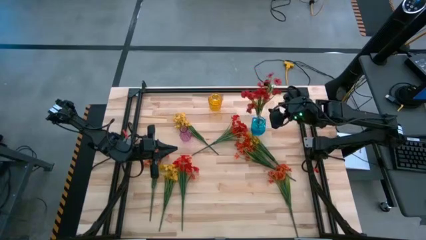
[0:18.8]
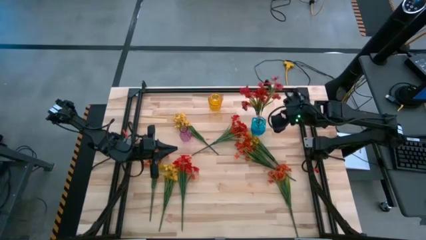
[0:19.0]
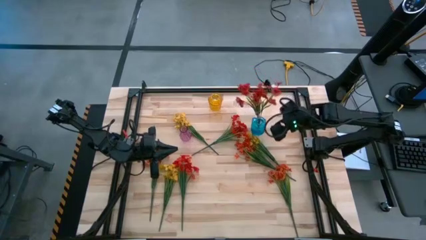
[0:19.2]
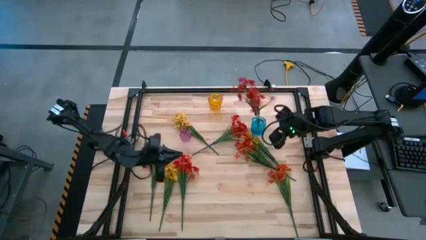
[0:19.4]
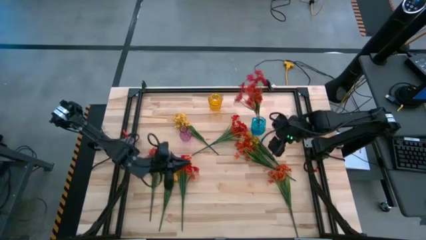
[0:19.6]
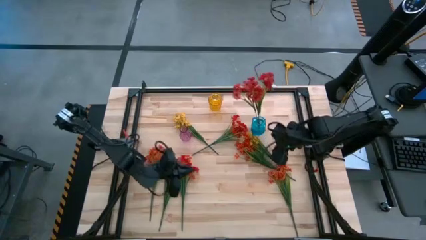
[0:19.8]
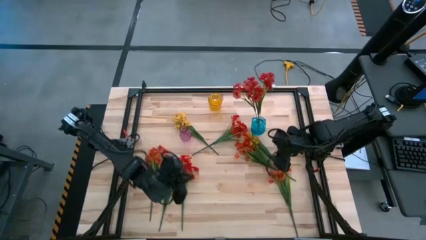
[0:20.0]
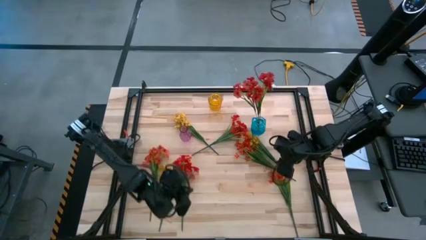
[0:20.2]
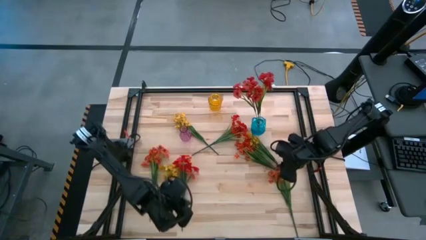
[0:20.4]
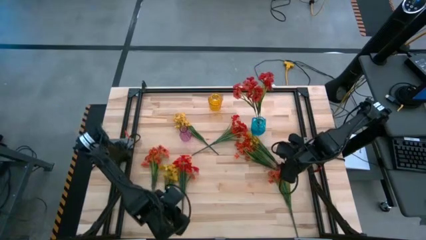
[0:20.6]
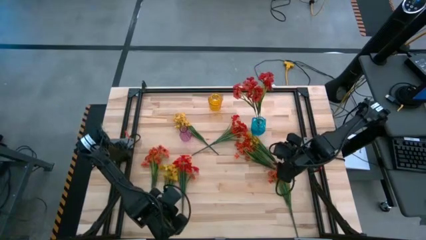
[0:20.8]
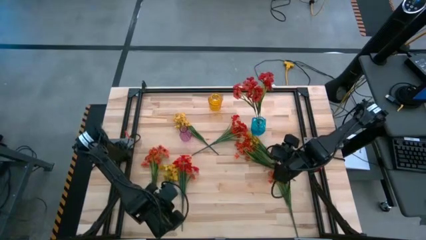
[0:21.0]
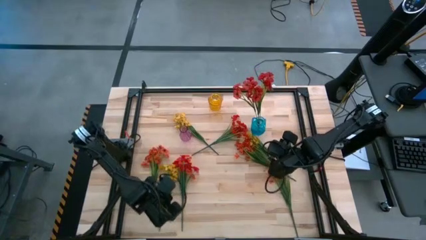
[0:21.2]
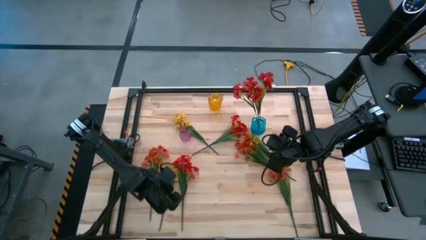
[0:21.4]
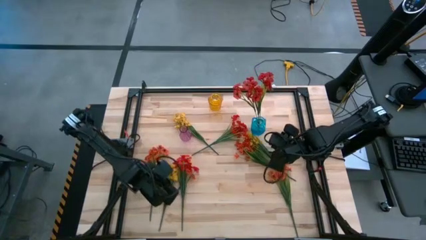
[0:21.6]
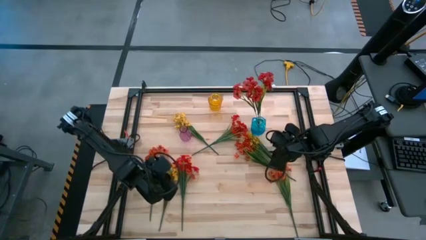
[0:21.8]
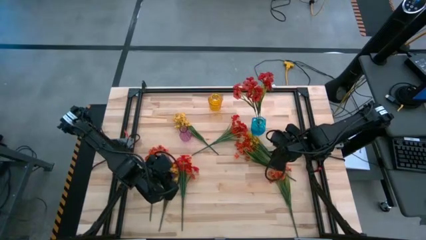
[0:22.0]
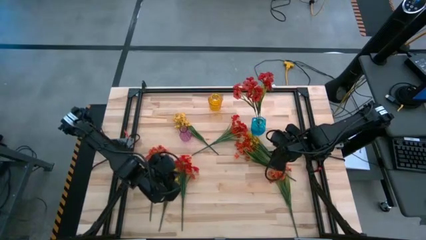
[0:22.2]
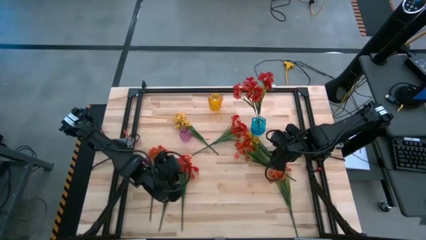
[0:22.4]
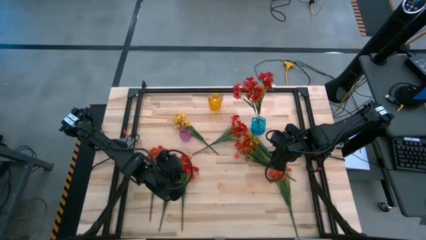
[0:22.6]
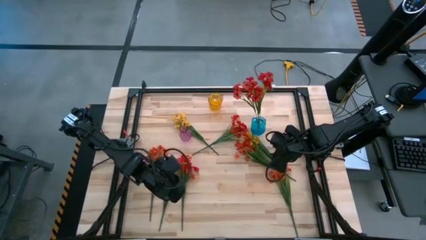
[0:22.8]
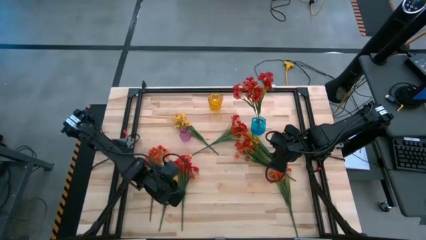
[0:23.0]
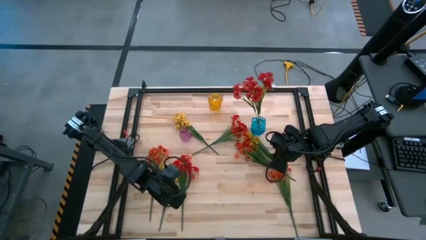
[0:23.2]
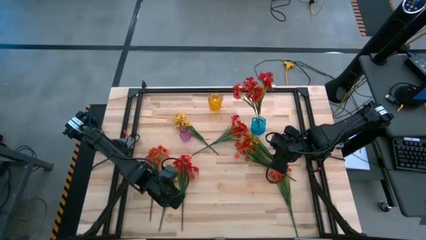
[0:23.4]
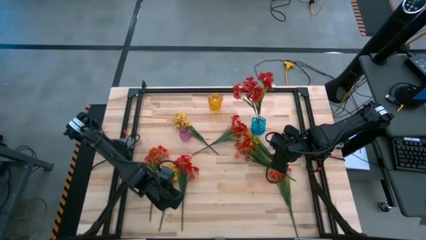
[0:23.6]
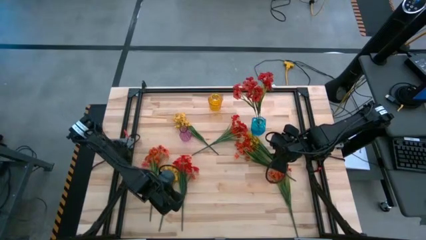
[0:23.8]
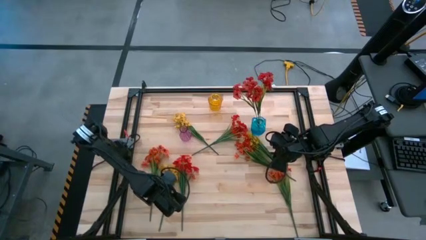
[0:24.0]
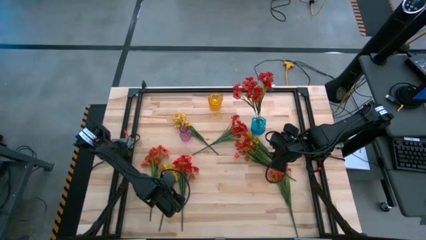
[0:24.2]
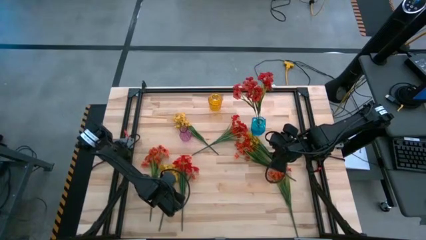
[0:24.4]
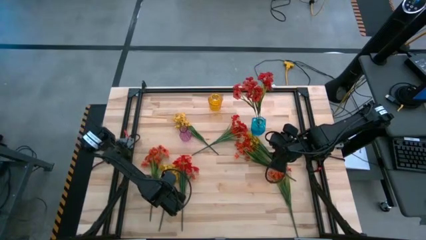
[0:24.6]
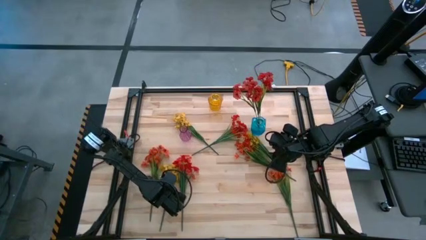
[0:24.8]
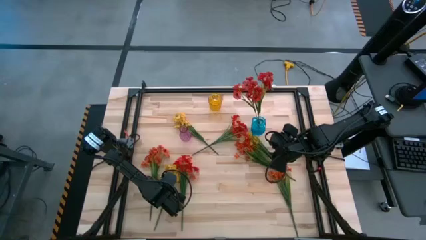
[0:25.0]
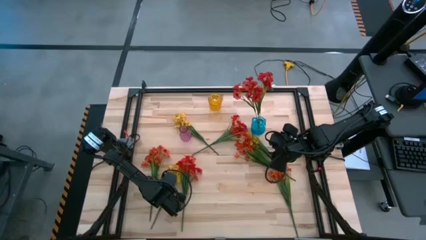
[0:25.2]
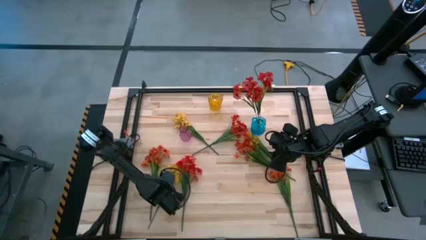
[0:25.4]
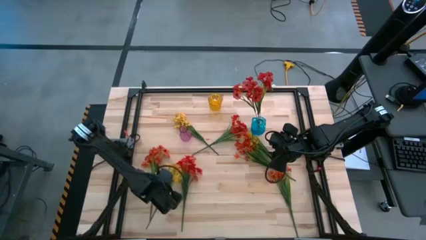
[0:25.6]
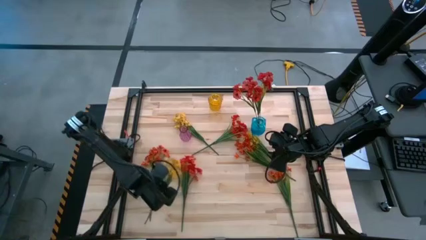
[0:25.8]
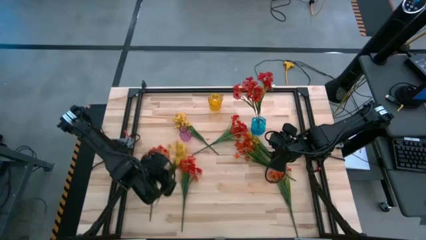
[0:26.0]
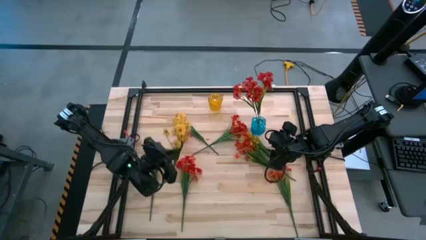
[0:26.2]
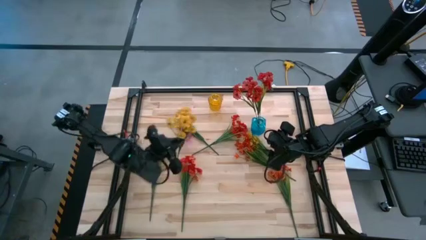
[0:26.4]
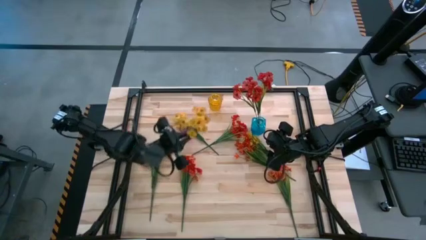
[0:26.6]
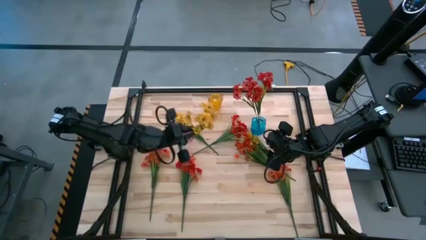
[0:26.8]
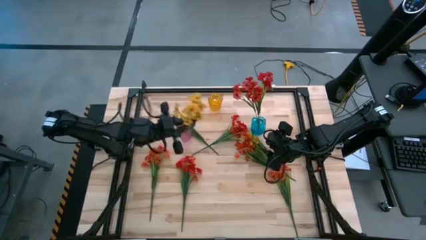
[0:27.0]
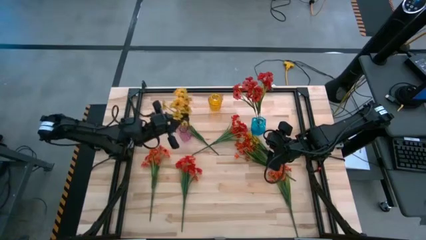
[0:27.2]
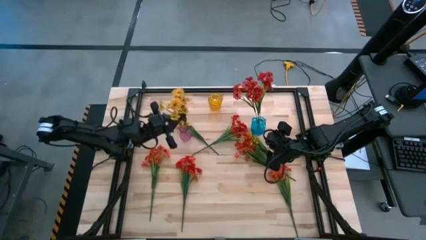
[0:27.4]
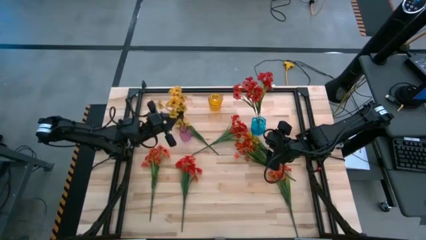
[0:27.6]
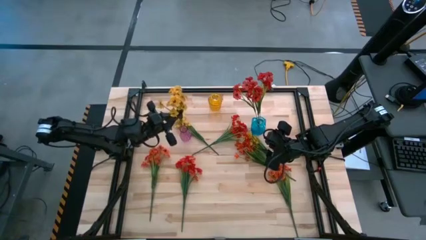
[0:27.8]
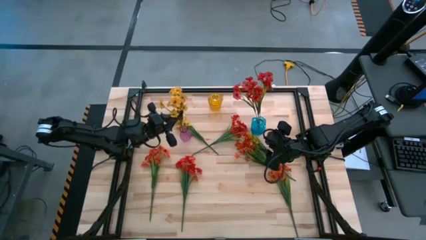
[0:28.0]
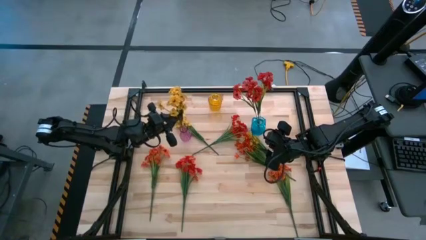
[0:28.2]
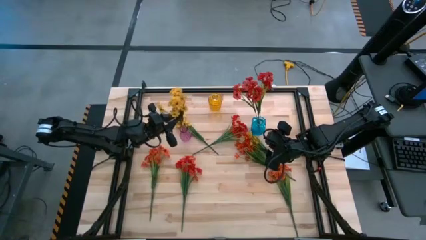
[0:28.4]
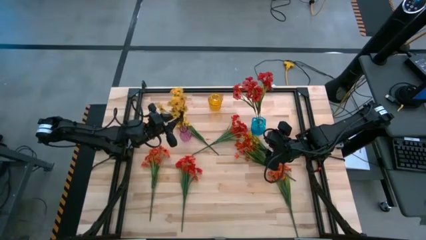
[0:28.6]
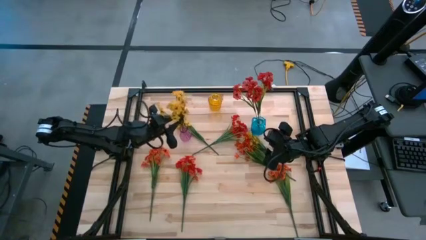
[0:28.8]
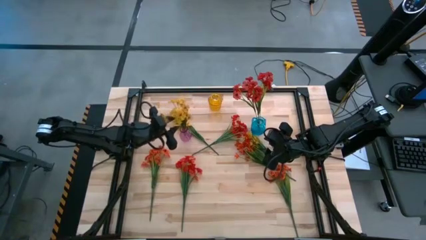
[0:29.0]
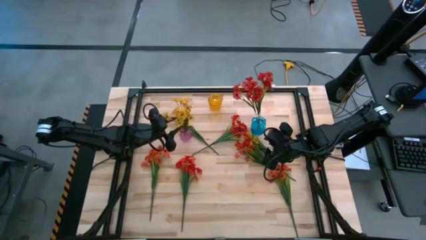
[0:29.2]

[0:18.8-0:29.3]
Task: Sort flowers into vase by color
Put the bottom left yellow flower into the purple vase

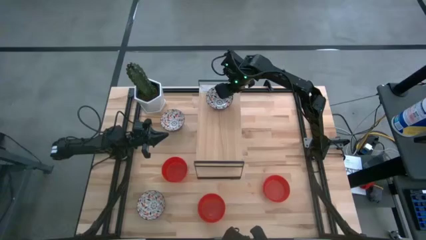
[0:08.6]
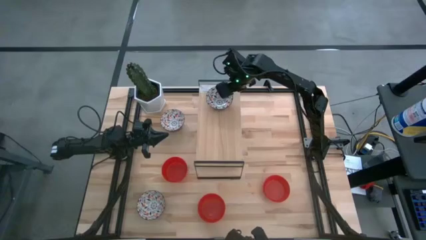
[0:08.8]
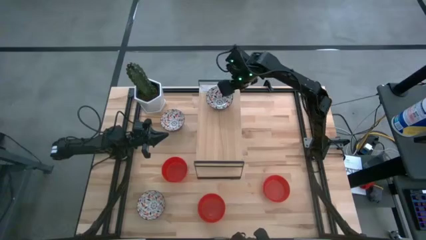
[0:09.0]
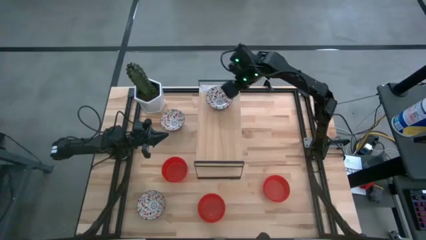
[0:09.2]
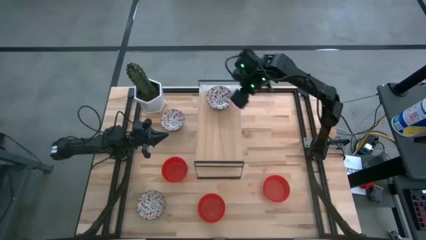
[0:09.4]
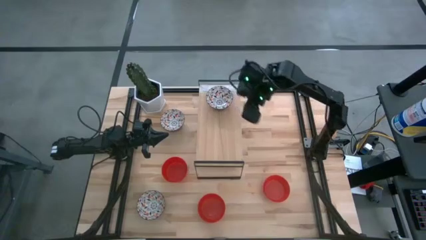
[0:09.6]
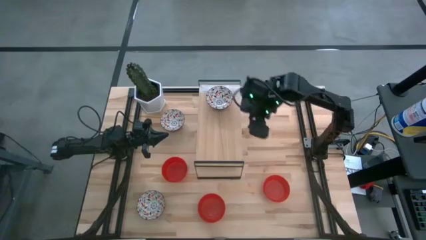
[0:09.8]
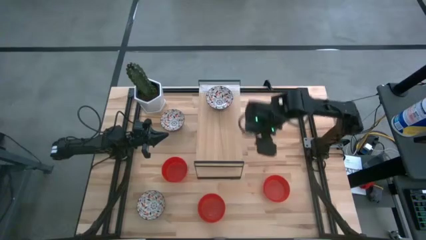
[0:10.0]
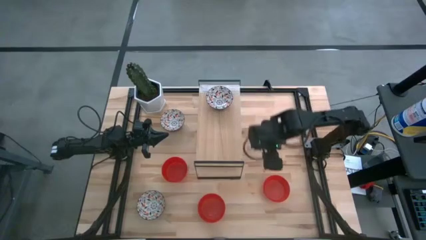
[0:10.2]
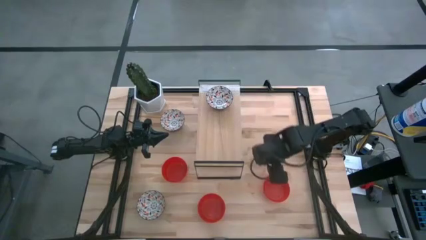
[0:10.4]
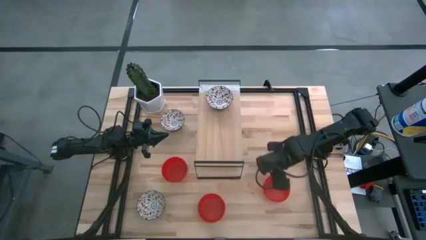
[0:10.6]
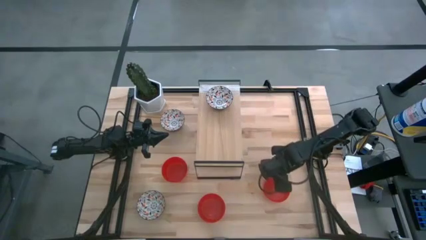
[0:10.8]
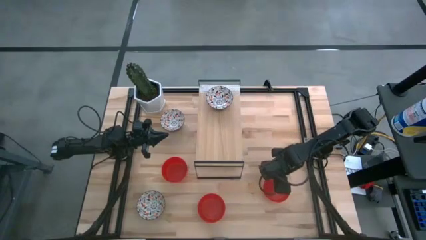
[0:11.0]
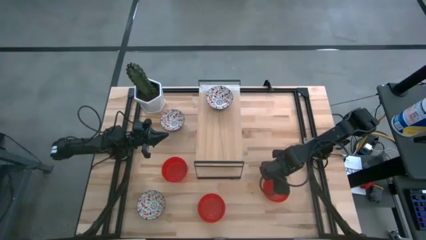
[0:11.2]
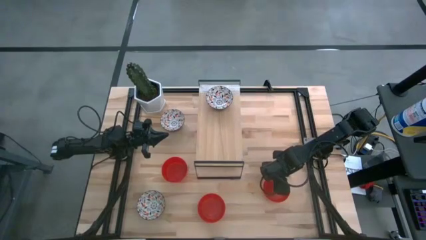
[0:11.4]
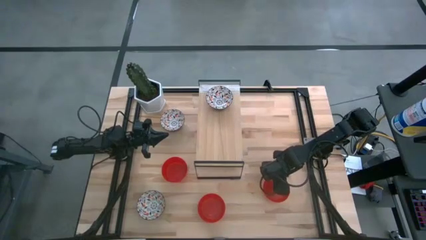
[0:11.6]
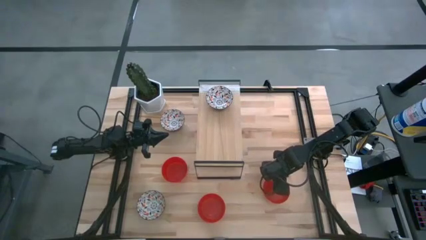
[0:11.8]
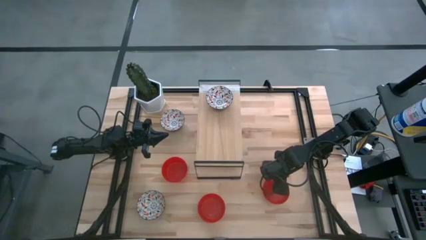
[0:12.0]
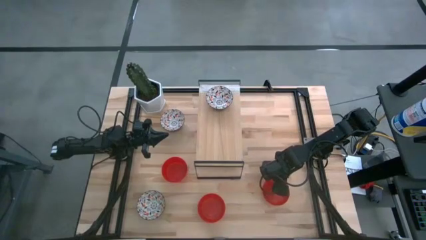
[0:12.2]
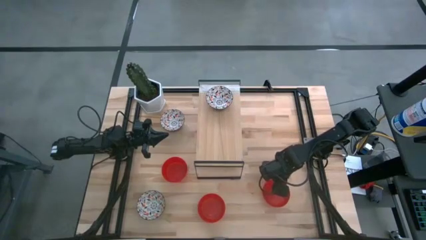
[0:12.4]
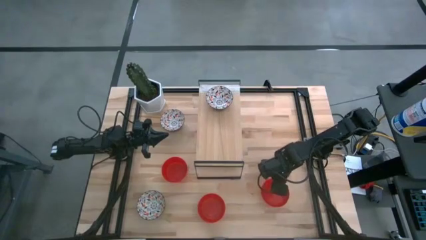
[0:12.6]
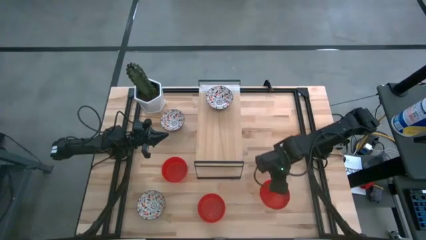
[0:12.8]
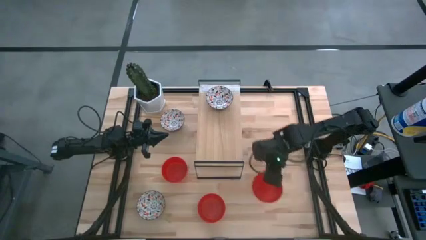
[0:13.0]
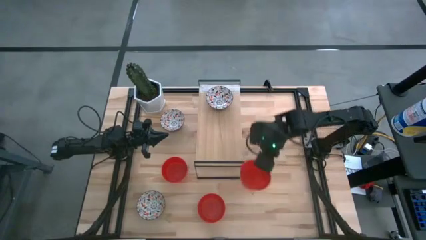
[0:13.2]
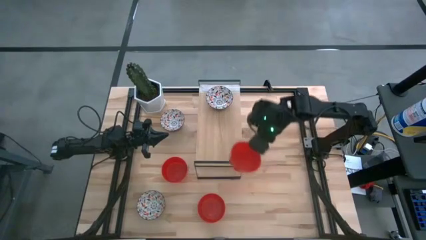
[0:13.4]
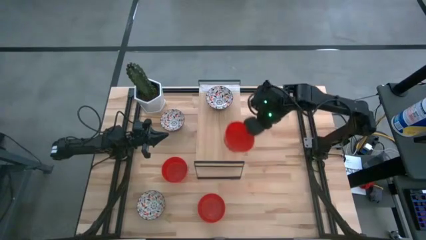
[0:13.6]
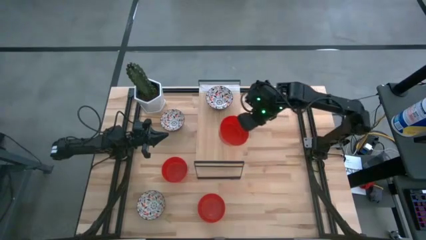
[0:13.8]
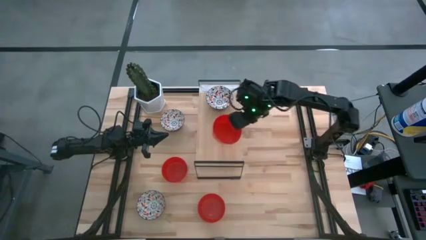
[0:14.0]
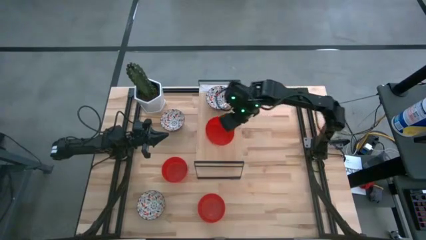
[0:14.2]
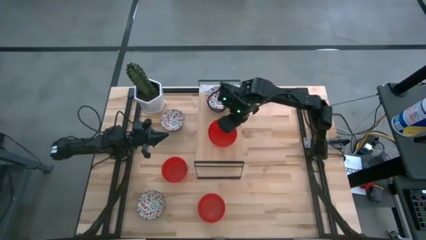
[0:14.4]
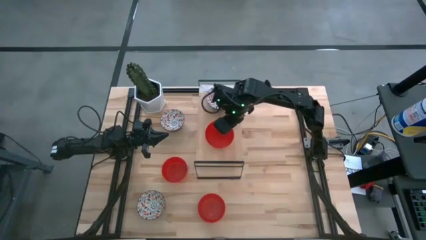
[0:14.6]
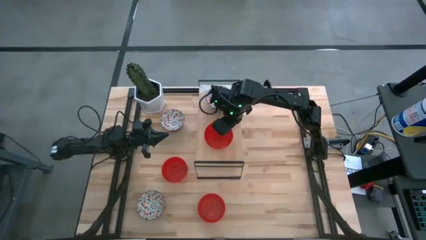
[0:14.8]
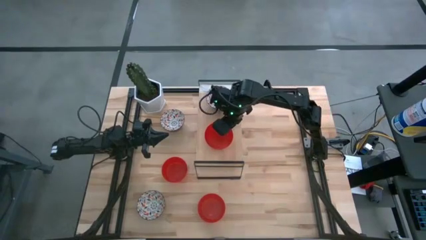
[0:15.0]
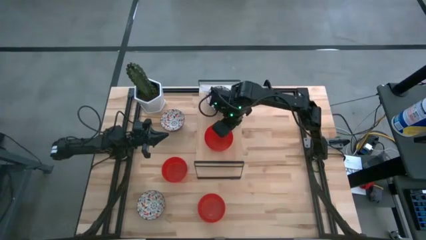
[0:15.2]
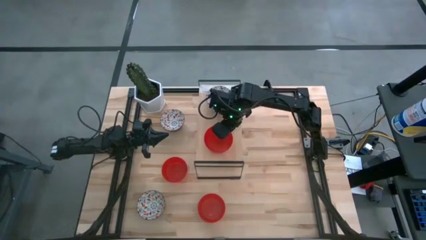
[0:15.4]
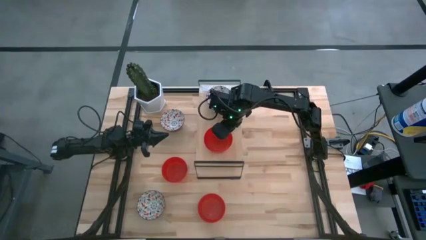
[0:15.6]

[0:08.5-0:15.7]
Task: Pick & Place Mini bowls
Put the middle red bowl on the shelf
